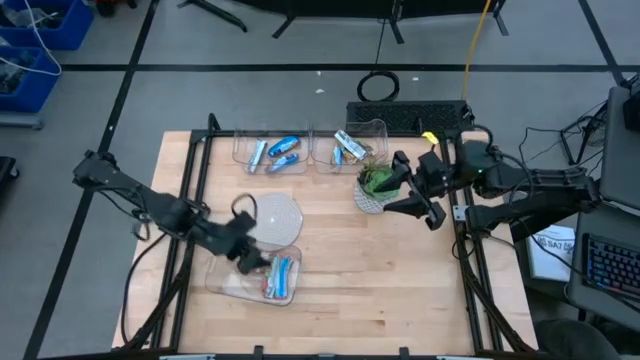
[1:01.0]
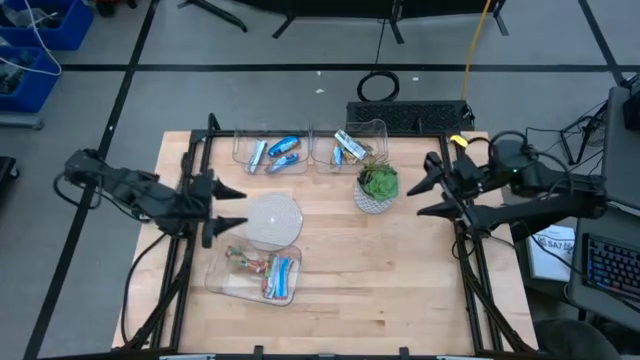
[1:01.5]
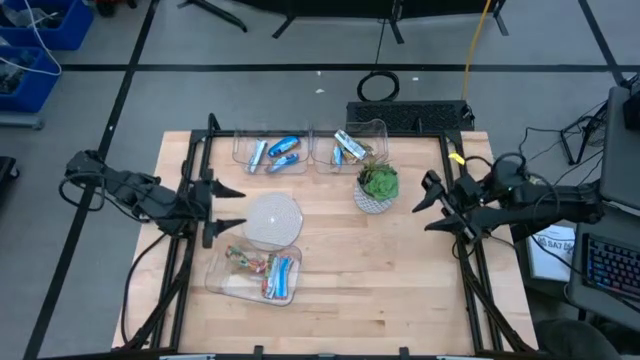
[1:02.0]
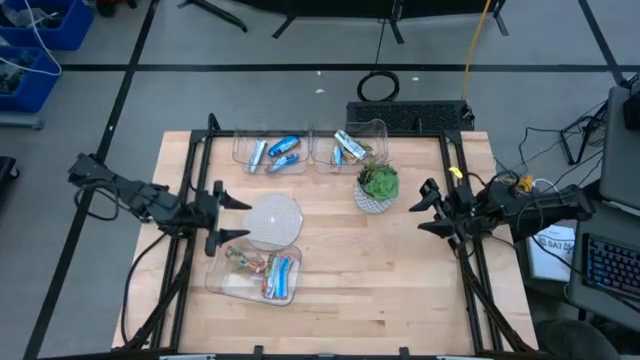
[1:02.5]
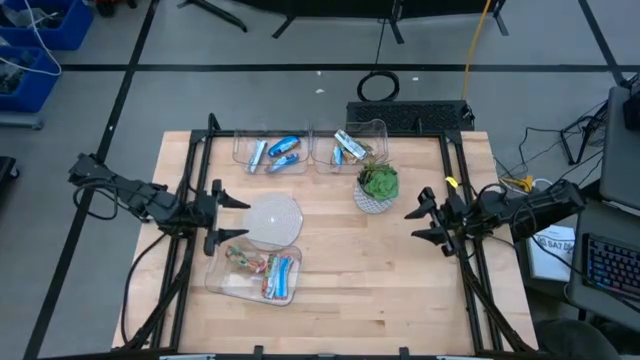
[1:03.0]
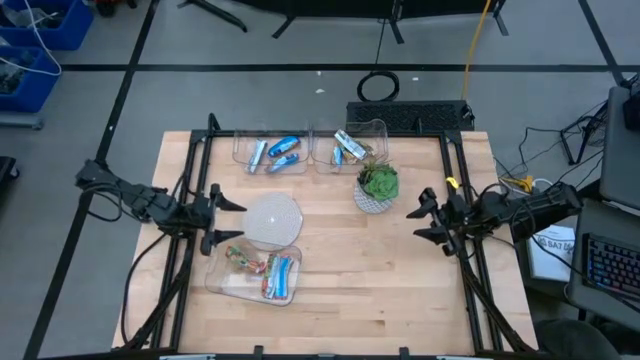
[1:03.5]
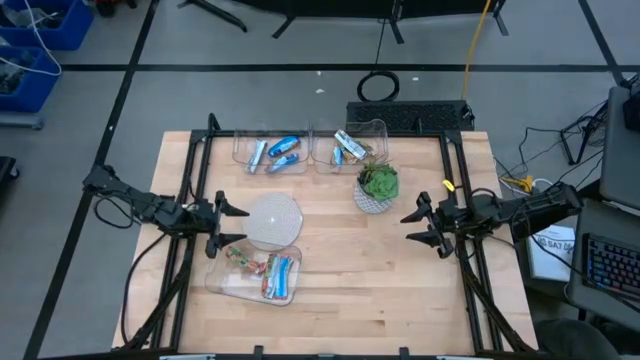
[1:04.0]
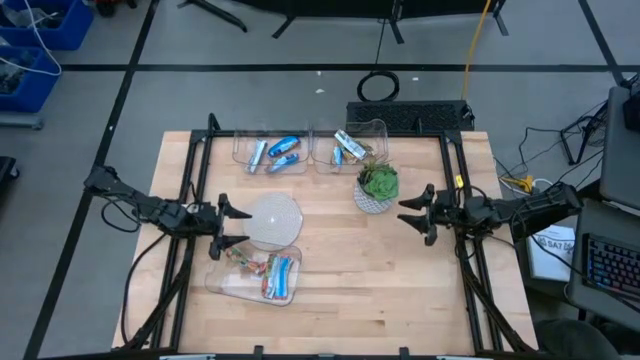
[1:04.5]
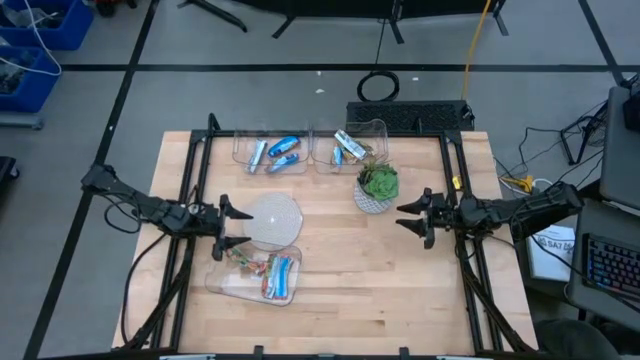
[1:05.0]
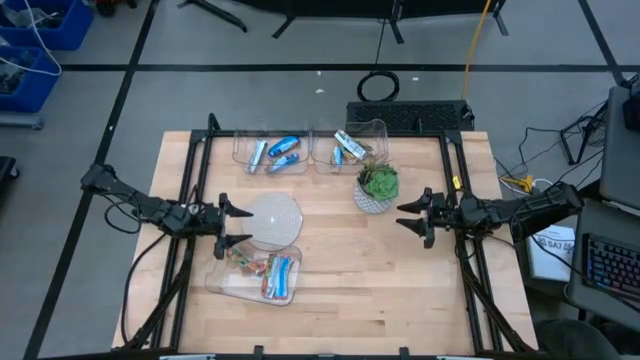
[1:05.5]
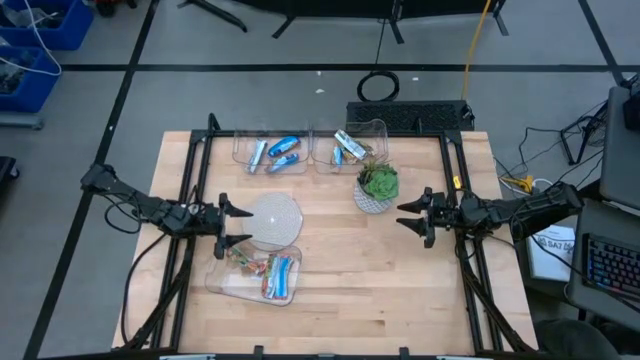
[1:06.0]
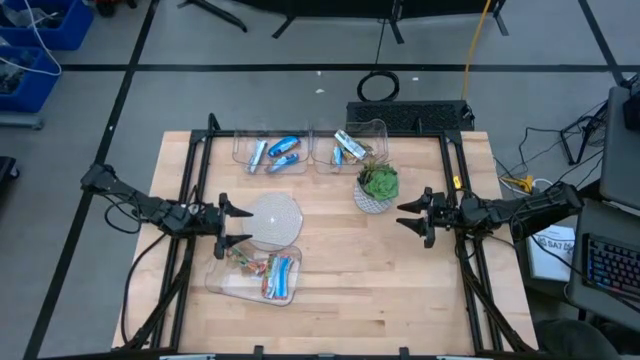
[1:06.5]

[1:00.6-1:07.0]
Task: Pick and place Granola Bars by type
Return to Home Position

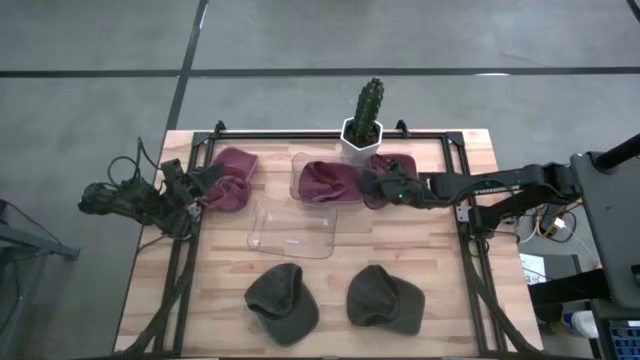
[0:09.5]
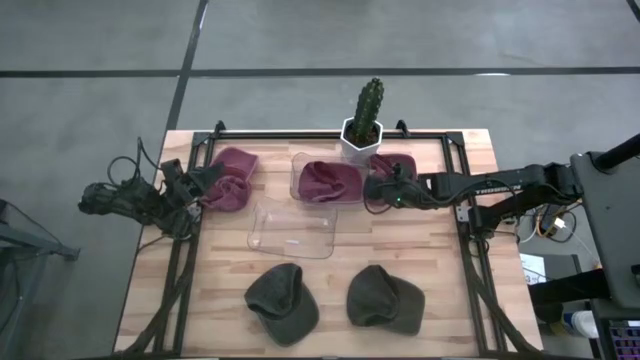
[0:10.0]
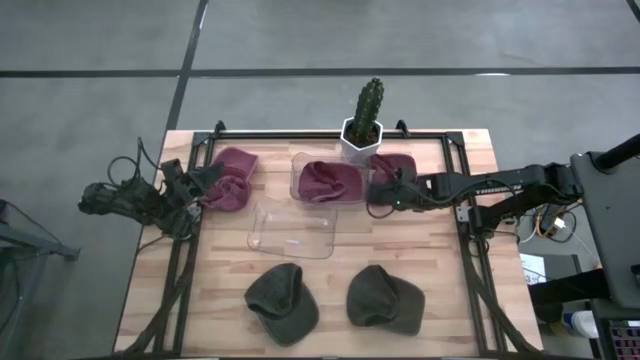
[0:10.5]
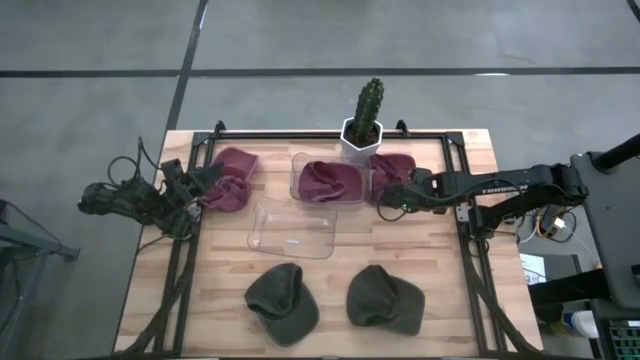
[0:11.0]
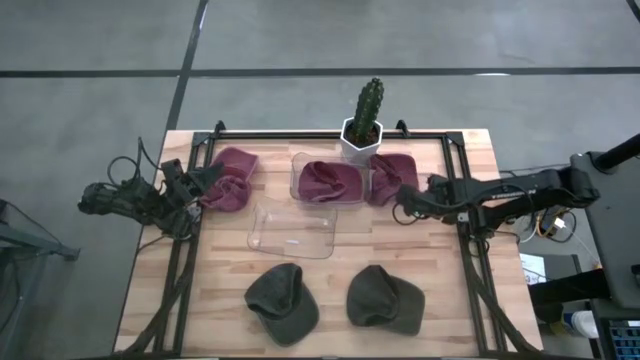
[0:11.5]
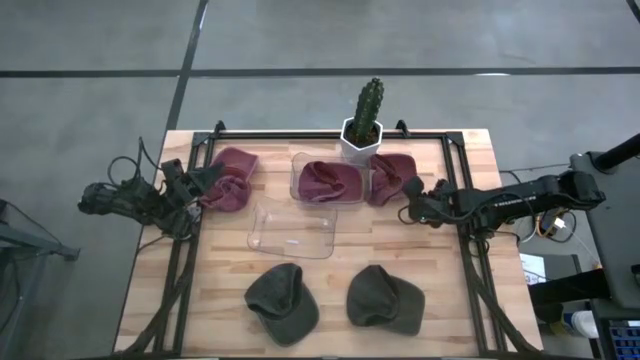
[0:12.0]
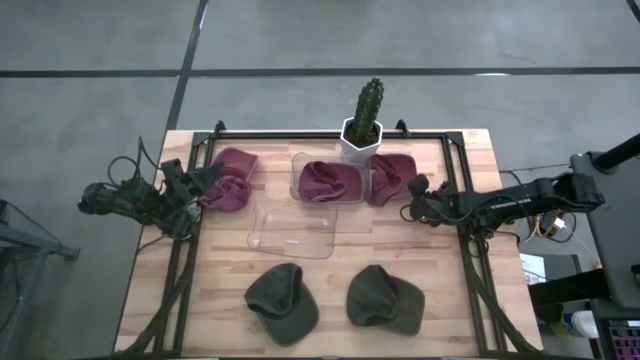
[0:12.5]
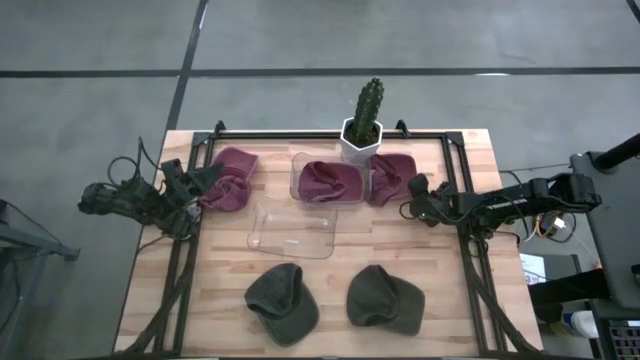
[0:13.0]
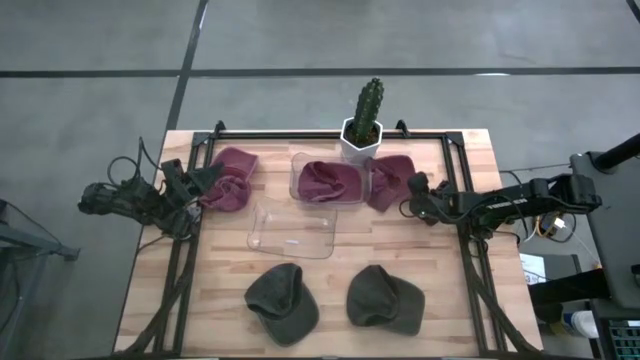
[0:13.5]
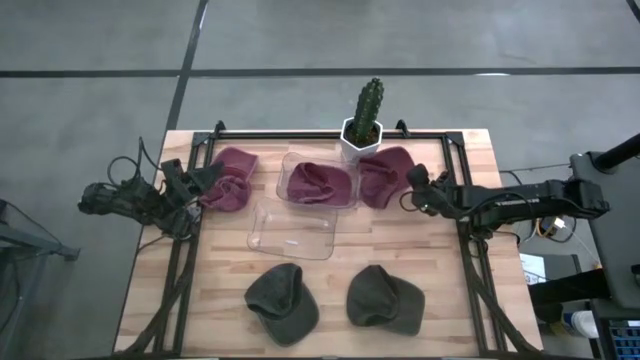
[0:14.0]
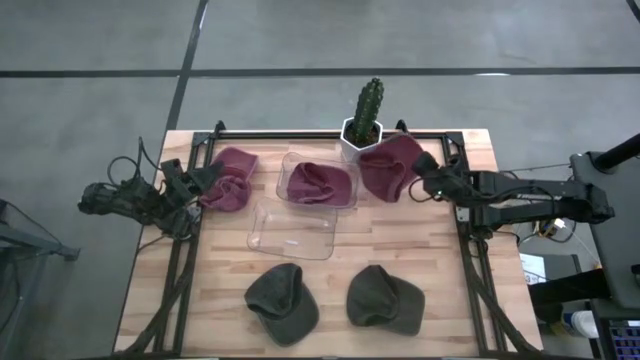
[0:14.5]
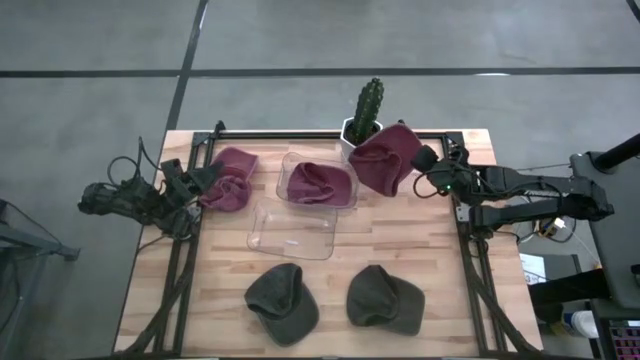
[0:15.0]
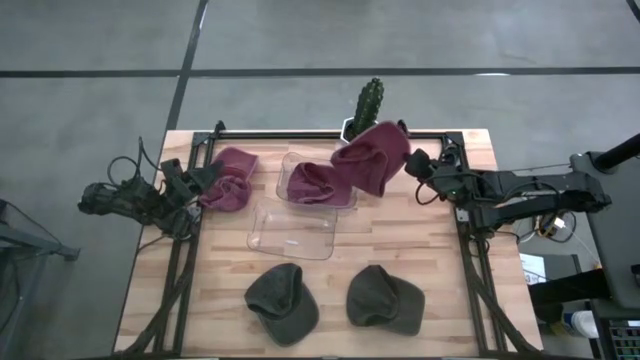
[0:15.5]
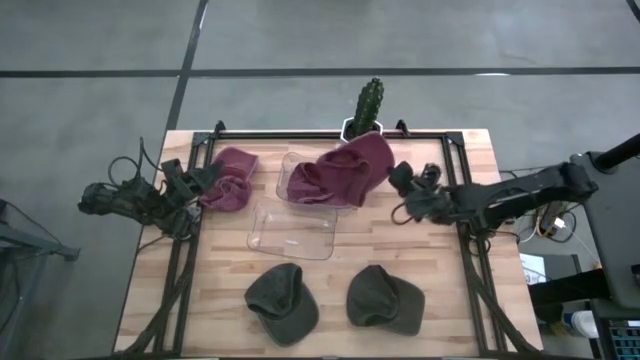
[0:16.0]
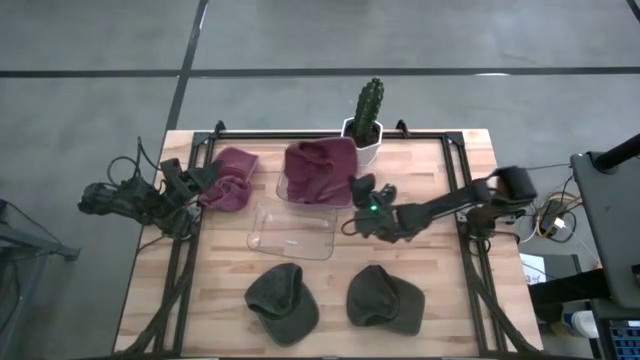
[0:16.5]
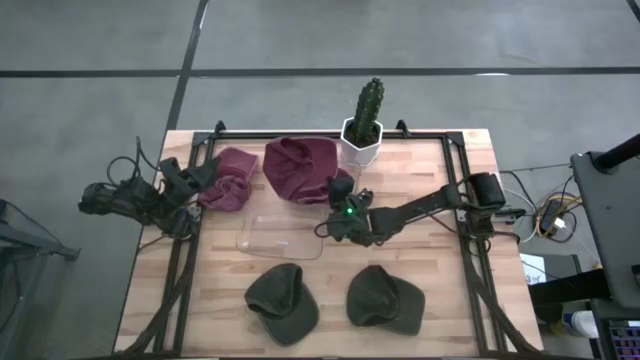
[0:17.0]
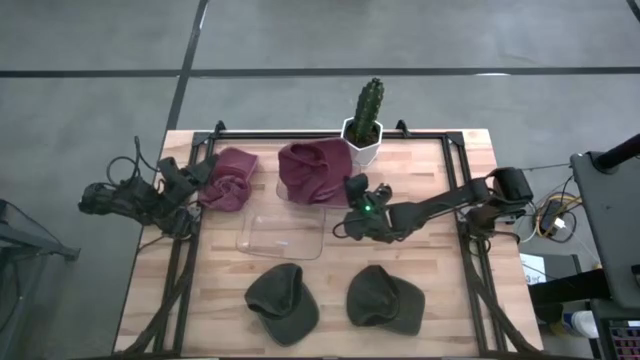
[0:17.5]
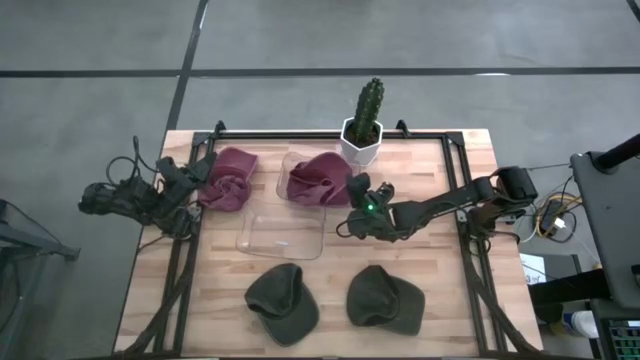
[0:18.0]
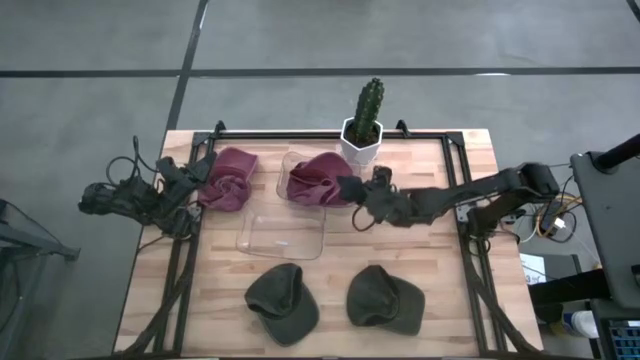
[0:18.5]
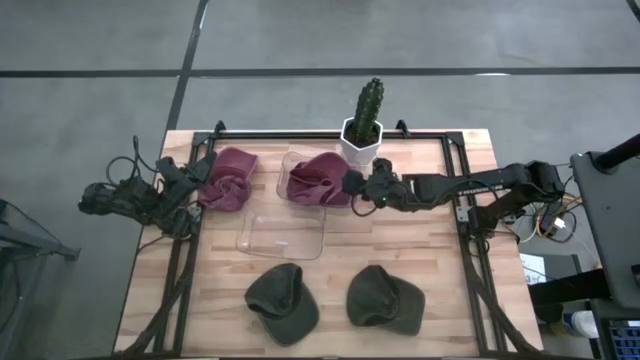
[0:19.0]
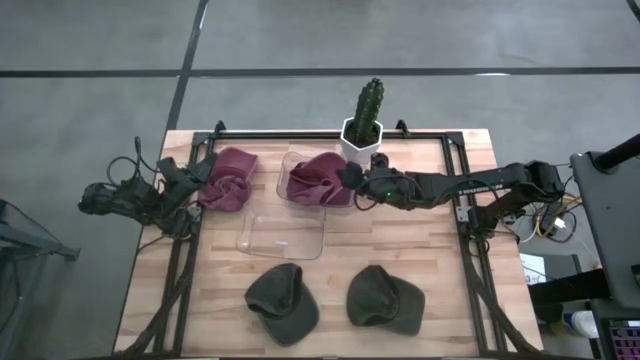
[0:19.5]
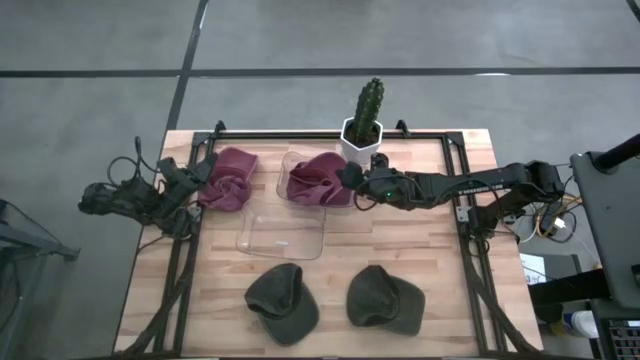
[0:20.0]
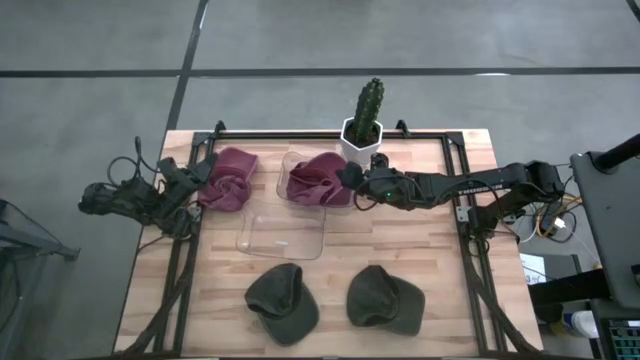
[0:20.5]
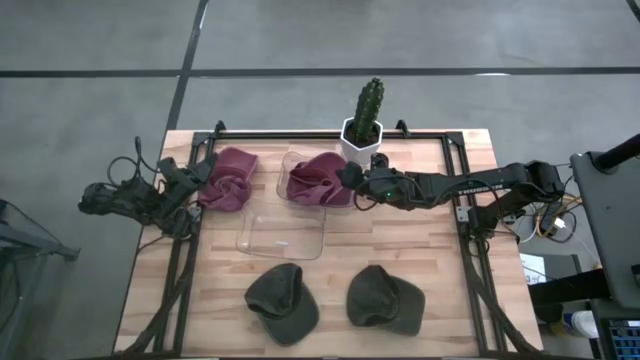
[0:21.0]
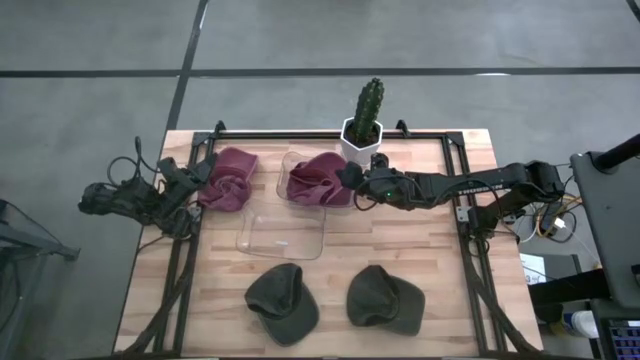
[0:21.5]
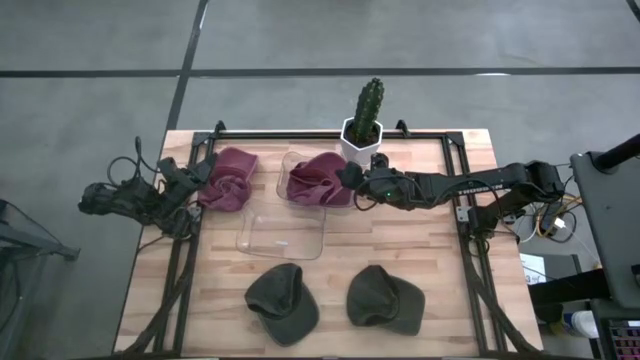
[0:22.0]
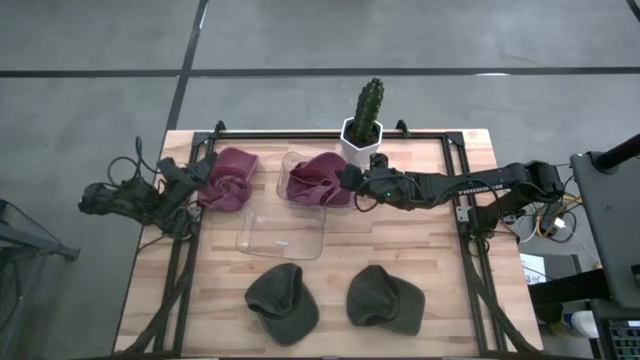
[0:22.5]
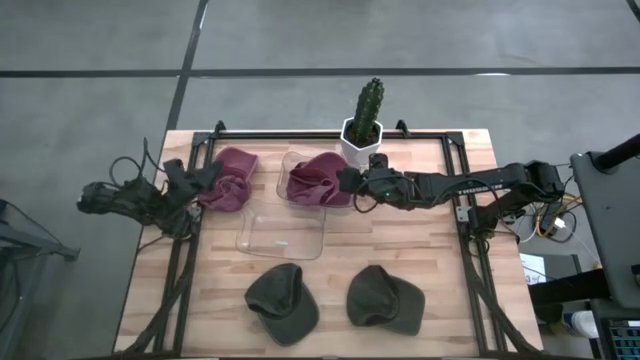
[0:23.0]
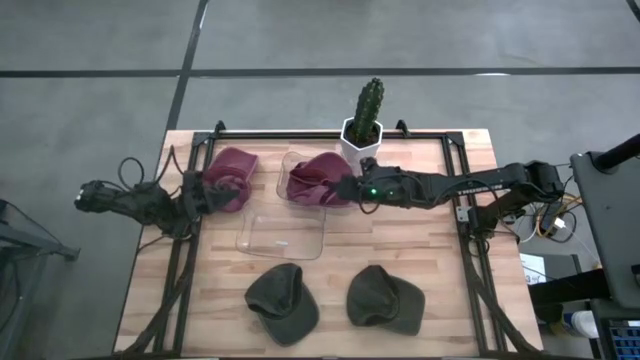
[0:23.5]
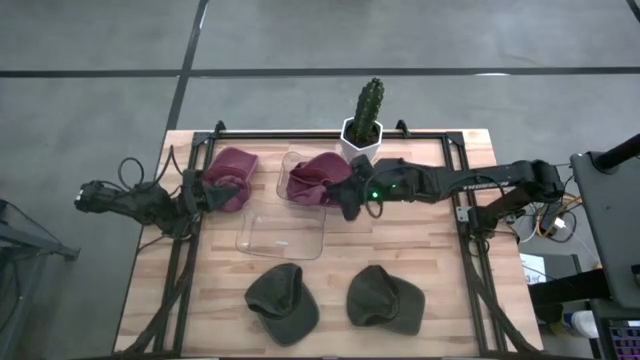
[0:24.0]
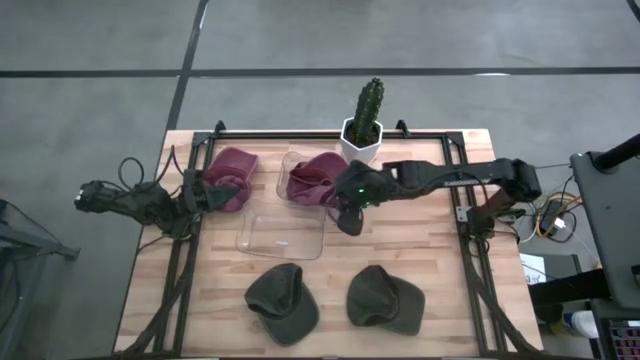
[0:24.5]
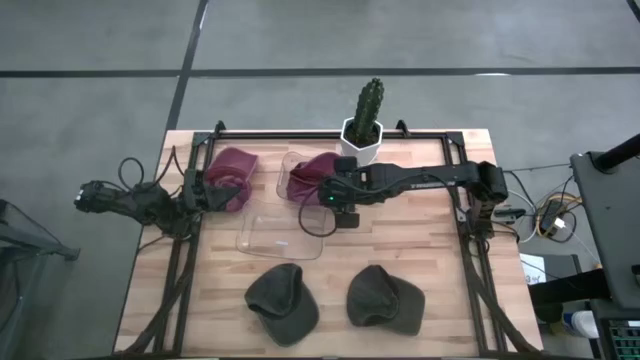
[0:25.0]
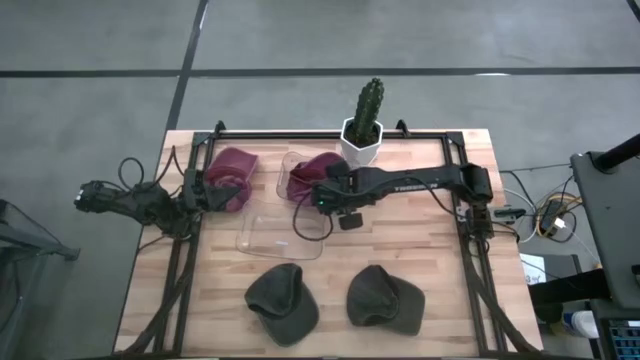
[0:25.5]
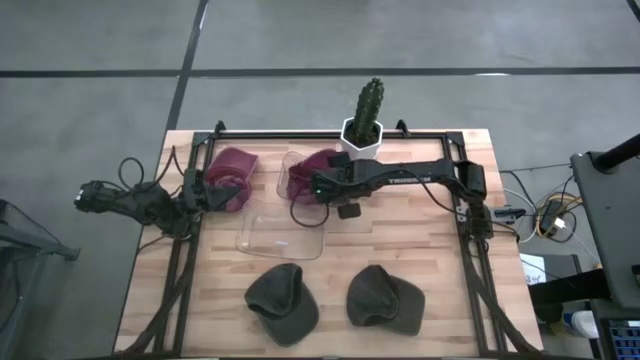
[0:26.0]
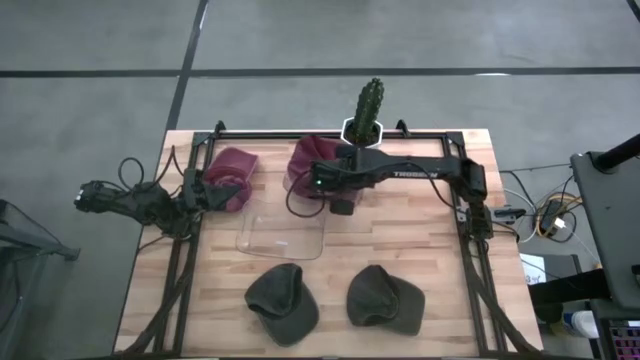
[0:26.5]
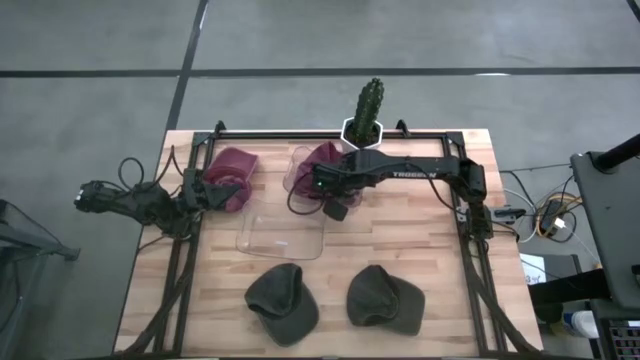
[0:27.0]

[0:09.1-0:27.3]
Task: Pick & Place hat
Put the right red cap into the top transparent bin
